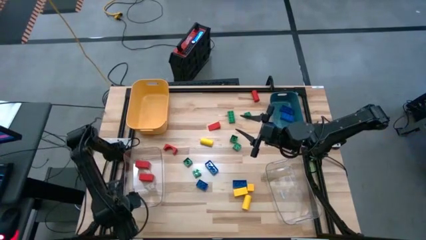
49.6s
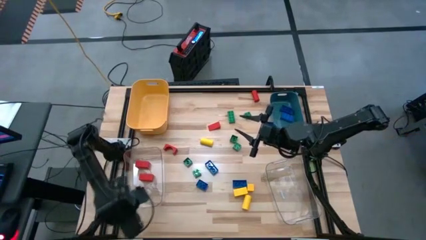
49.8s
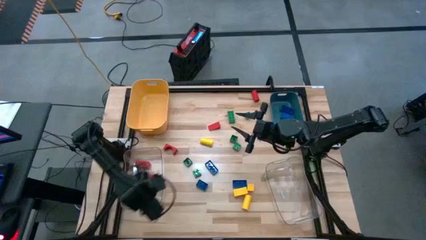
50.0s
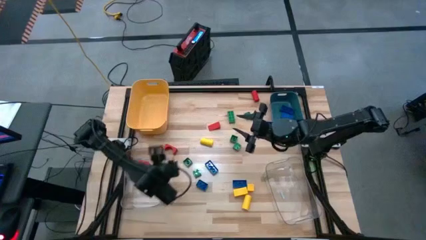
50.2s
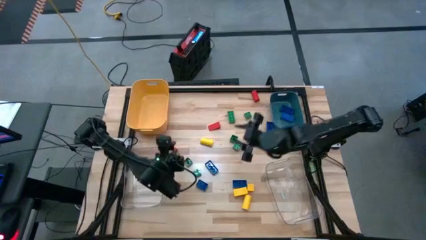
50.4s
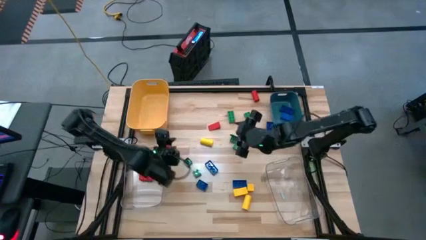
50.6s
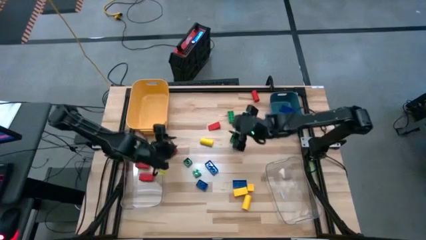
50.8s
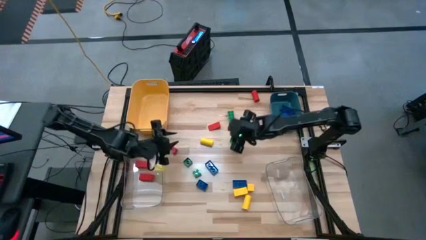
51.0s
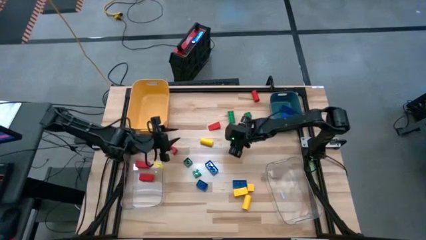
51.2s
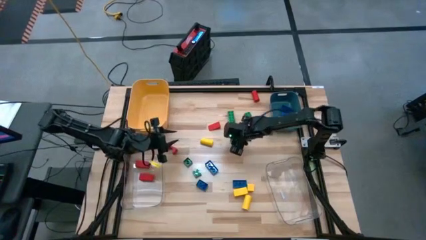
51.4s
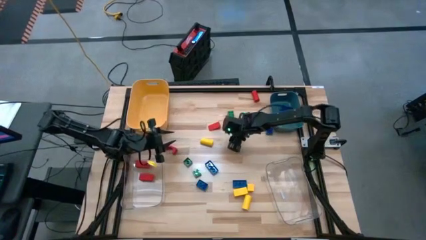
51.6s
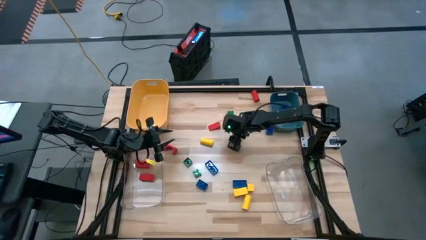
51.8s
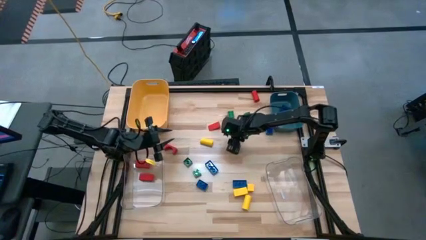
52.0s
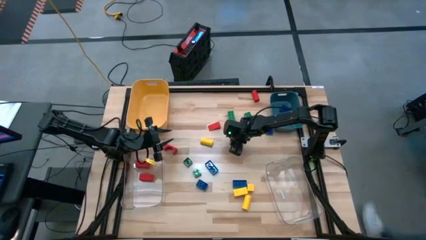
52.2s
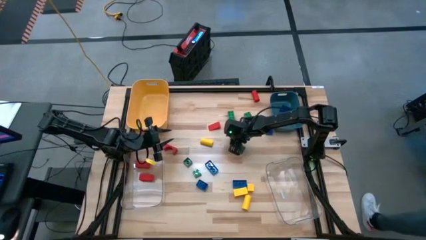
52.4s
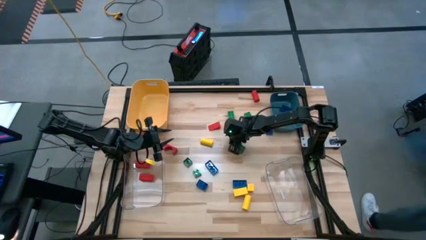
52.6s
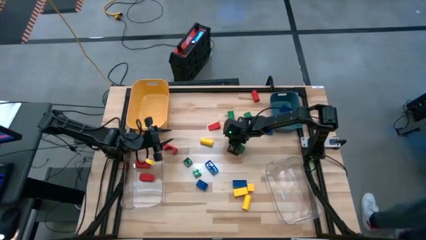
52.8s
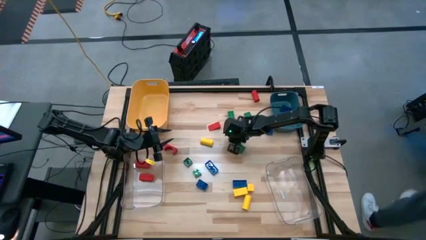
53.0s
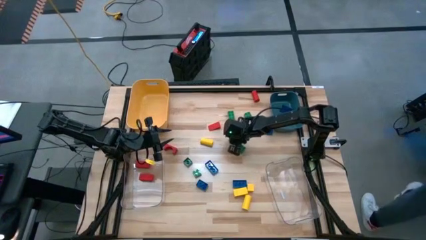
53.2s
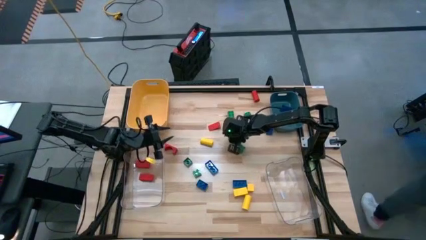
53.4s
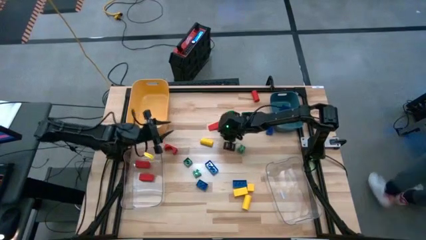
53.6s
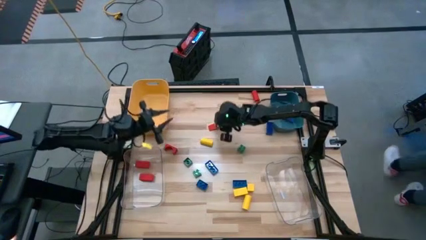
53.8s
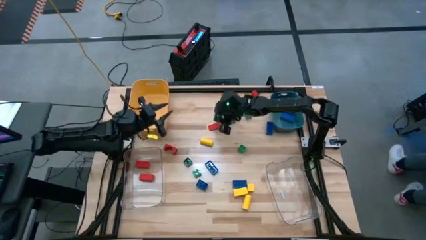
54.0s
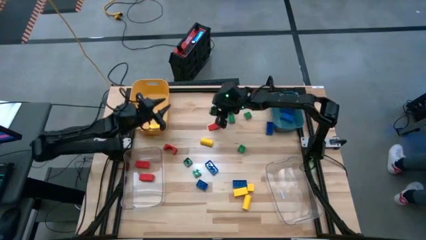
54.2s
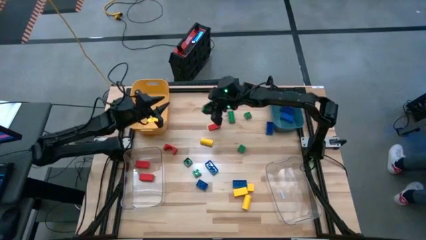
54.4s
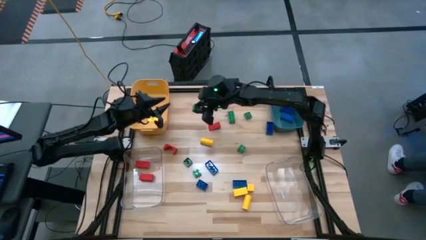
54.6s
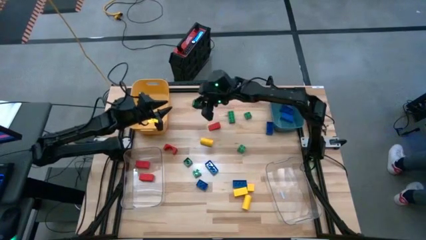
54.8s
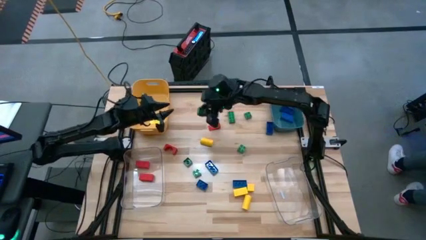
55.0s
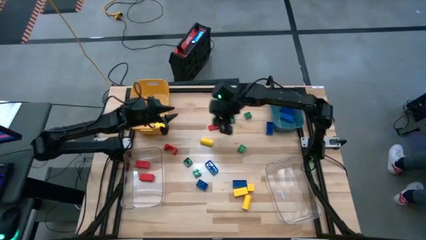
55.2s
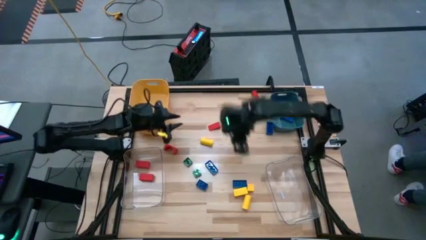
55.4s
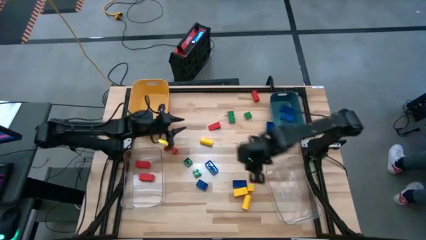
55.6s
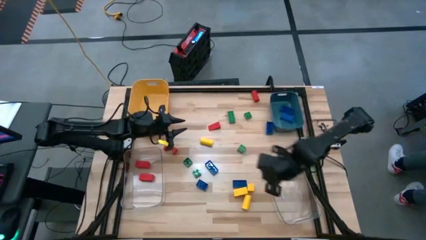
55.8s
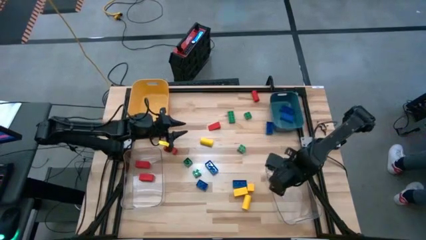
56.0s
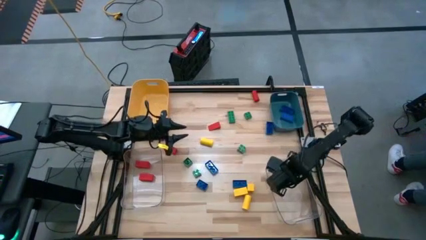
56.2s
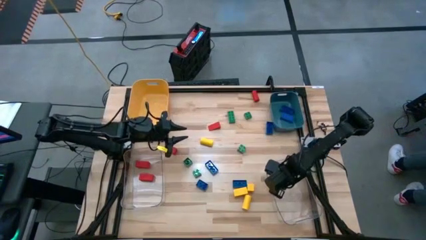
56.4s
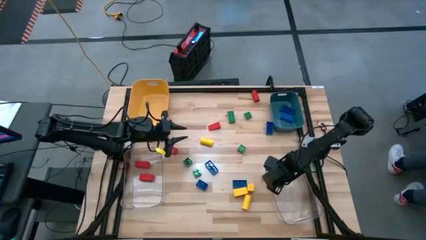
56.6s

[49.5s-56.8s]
Task: Sort blocks
Put the green game piece into the right transparent bin

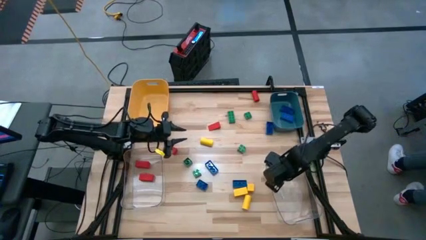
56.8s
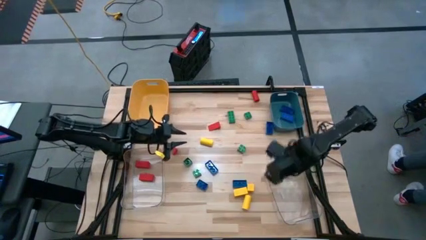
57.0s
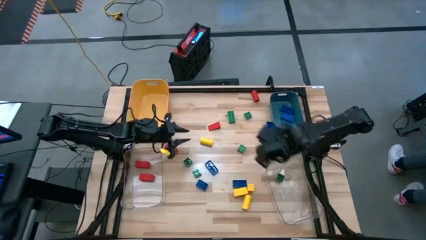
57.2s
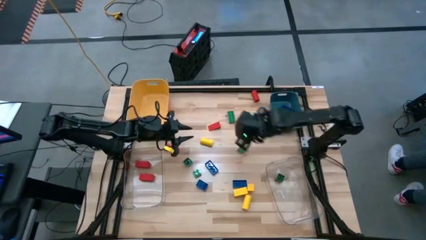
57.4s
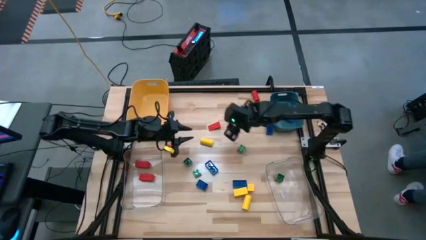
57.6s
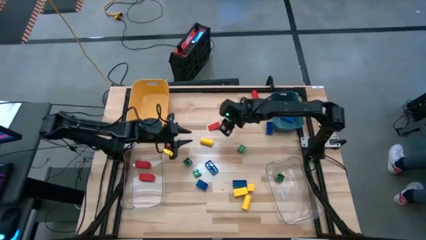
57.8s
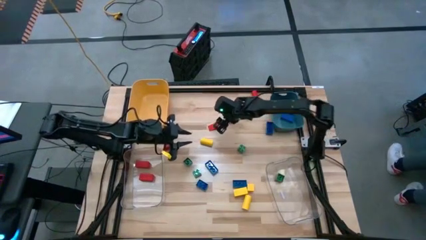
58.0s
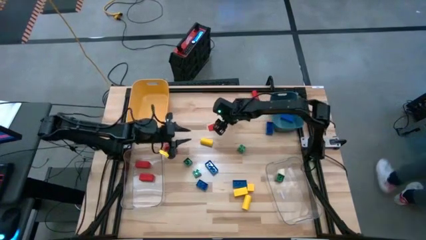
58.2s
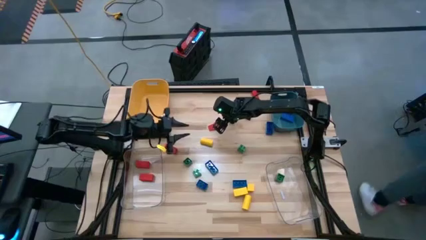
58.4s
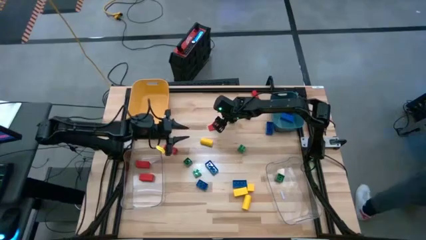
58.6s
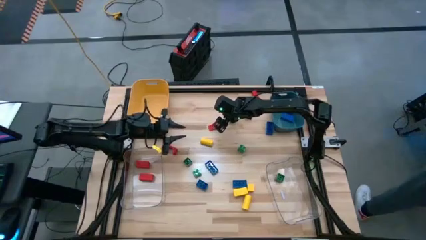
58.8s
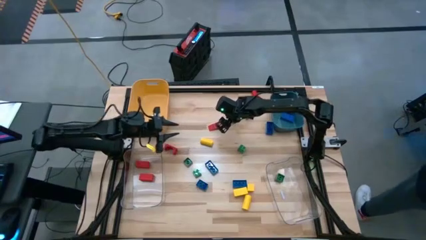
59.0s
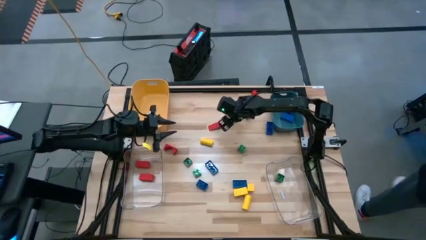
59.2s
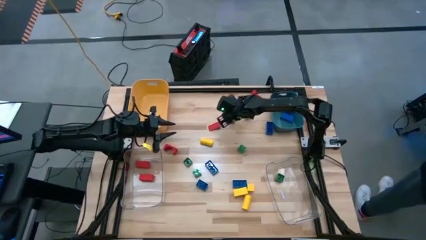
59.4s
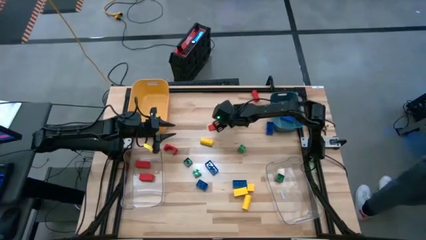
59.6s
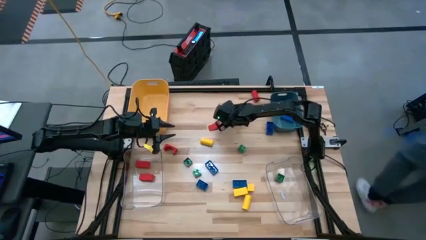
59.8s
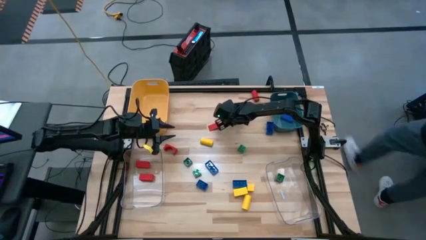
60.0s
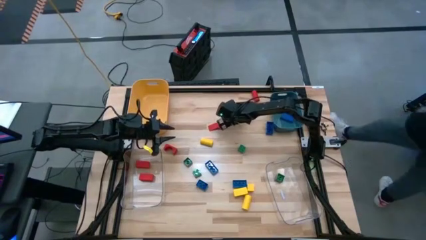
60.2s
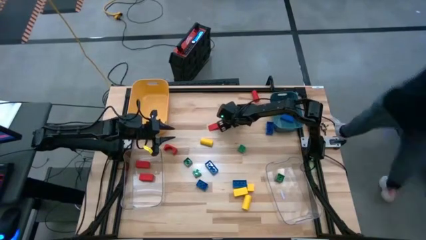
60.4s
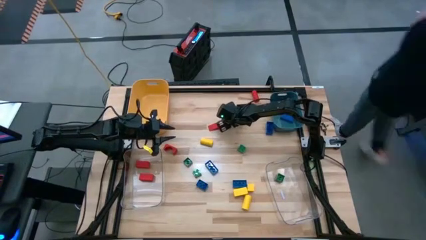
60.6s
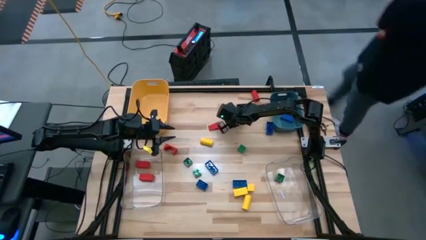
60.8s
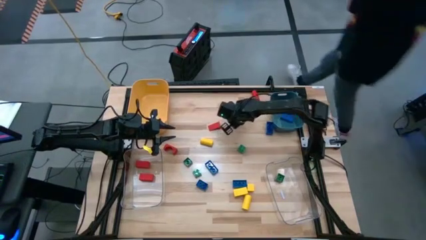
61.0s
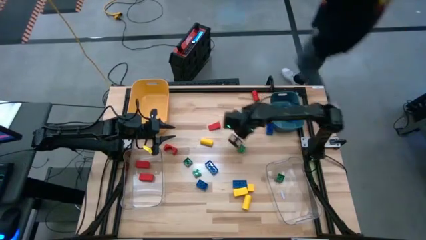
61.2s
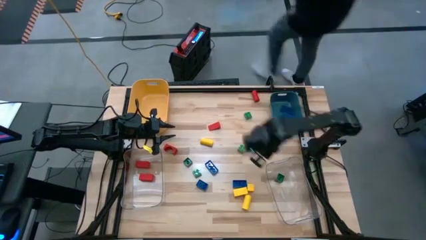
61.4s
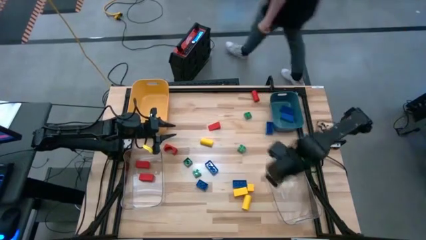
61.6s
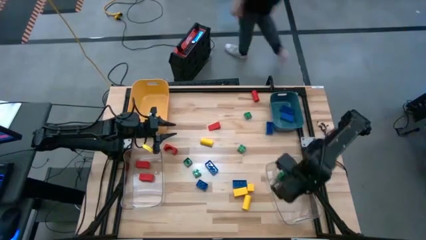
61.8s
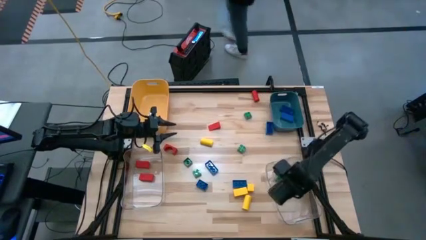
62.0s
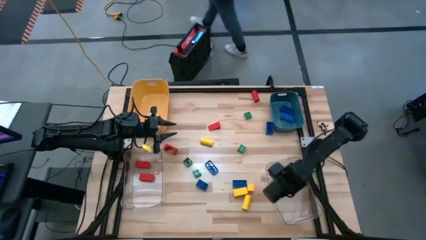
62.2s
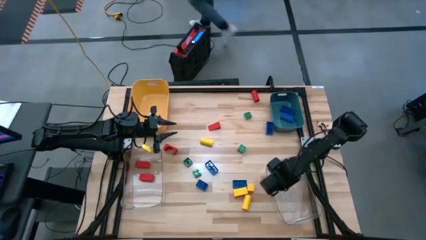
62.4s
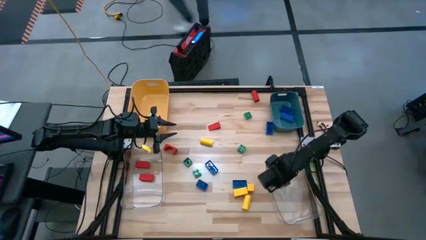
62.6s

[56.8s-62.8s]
Put the green game piece into the right transparent bin

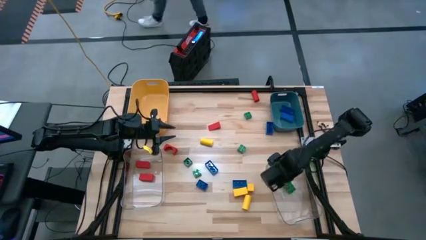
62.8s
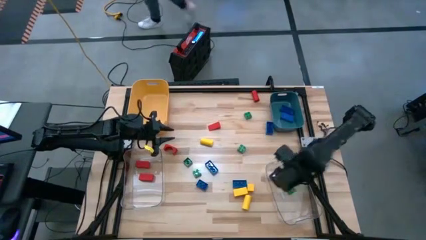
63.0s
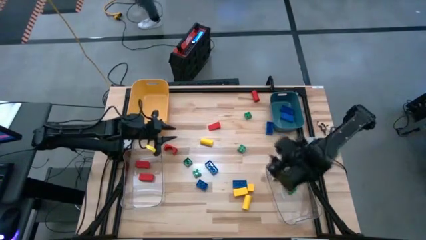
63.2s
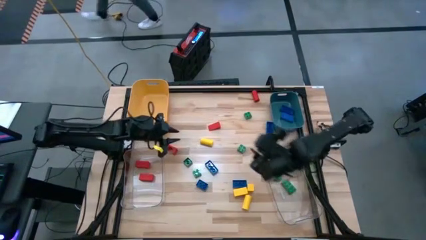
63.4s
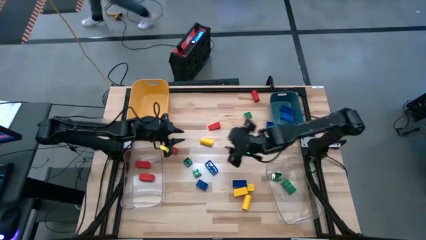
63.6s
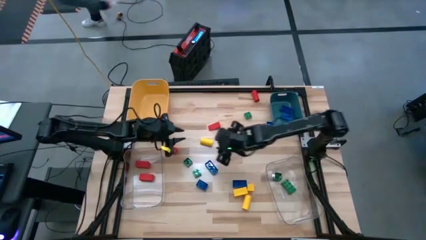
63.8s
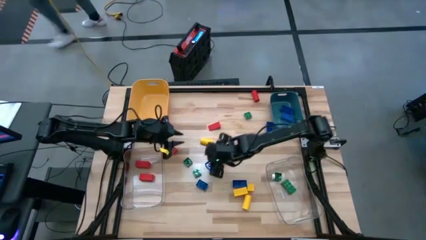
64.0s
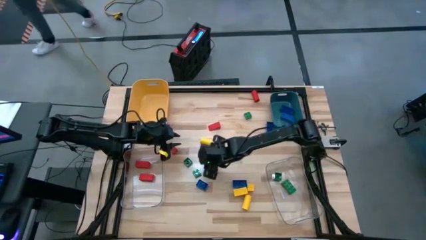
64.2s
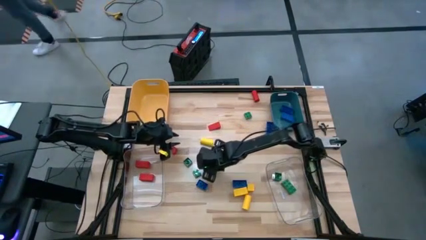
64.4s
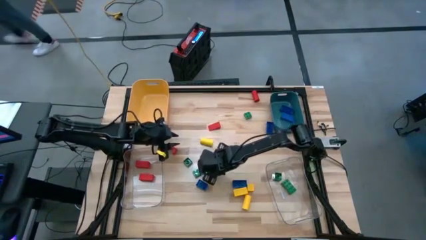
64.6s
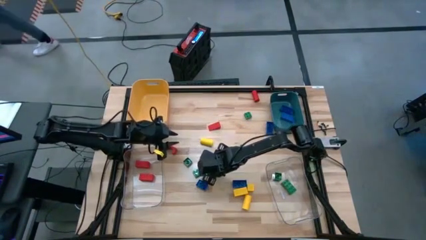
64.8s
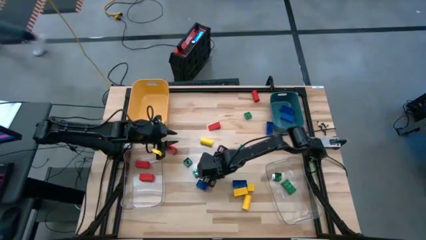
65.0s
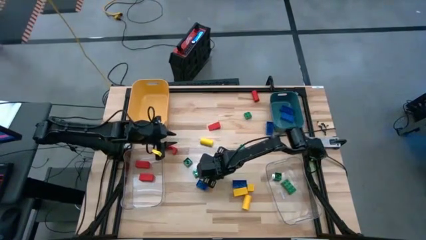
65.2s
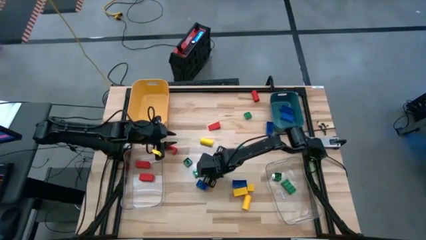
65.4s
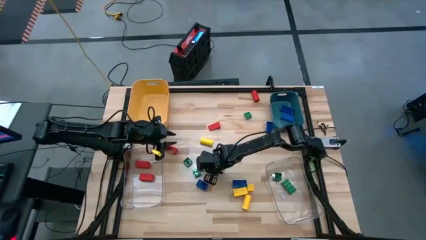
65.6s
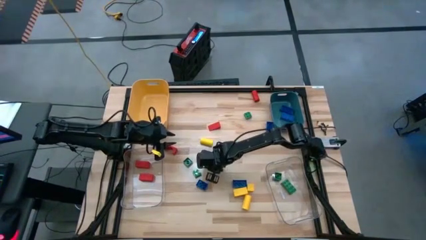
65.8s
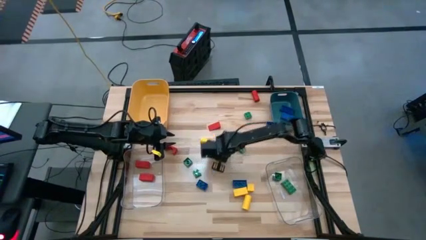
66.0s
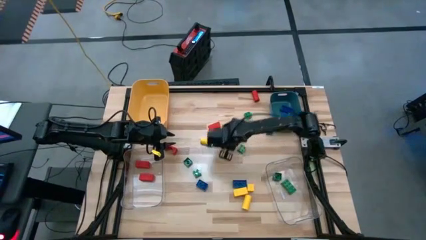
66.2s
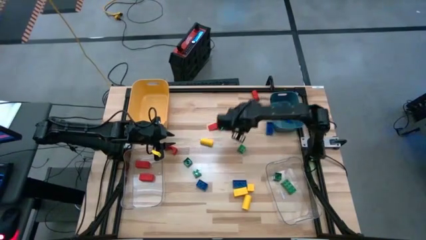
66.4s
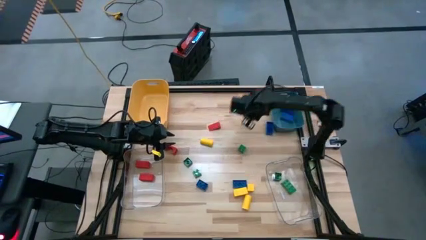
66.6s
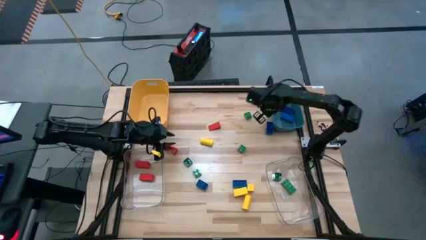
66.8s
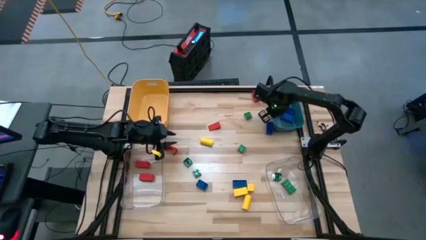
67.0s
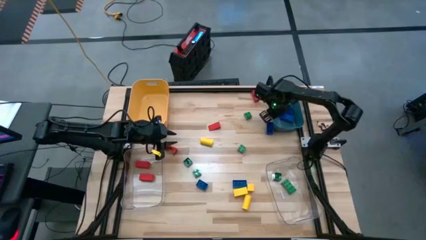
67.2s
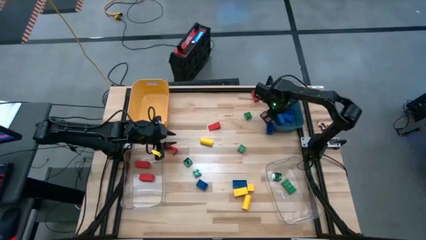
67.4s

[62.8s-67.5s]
Put the blue game piece into the blue bin
